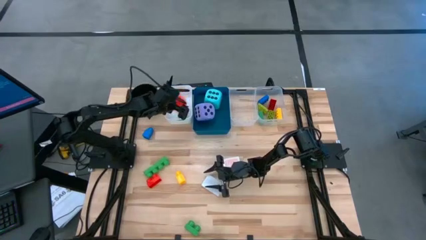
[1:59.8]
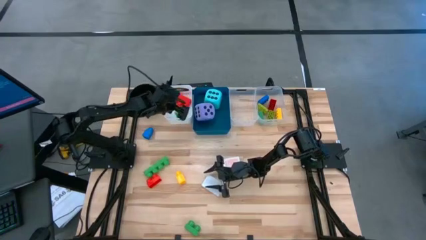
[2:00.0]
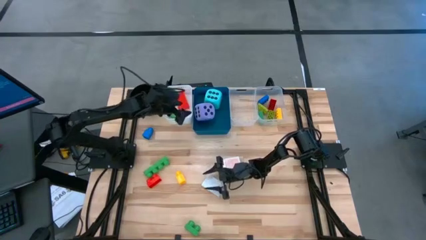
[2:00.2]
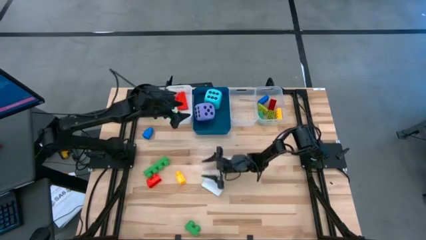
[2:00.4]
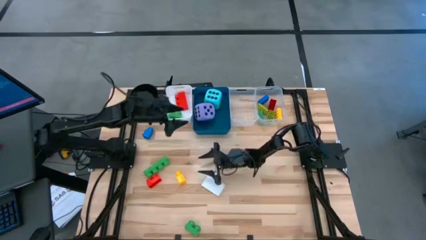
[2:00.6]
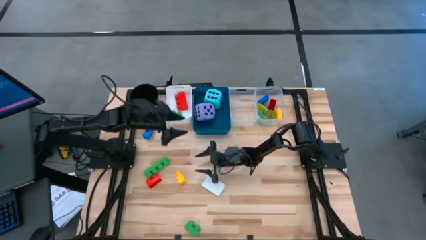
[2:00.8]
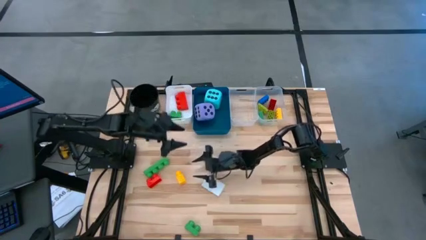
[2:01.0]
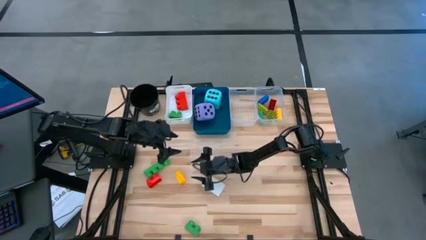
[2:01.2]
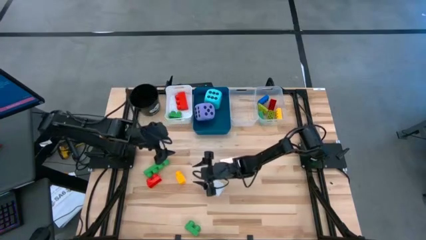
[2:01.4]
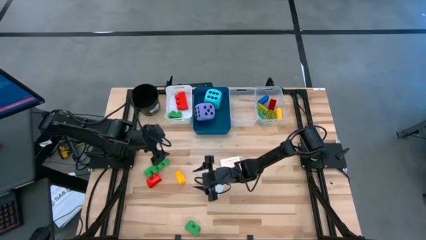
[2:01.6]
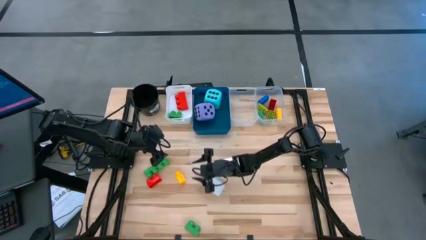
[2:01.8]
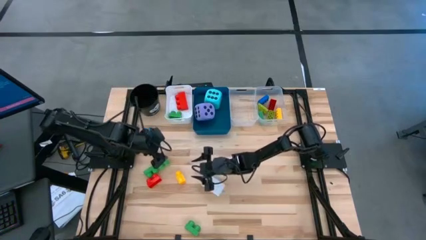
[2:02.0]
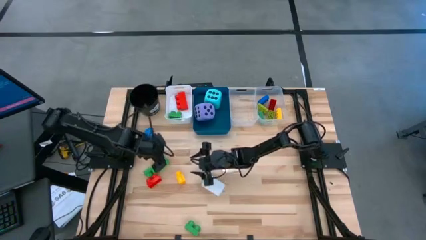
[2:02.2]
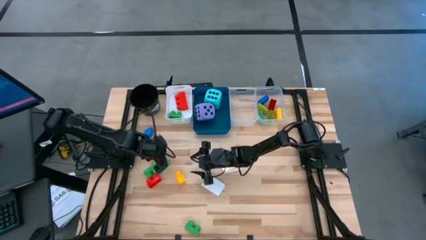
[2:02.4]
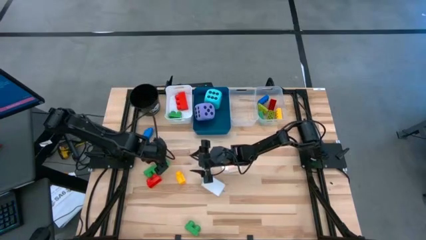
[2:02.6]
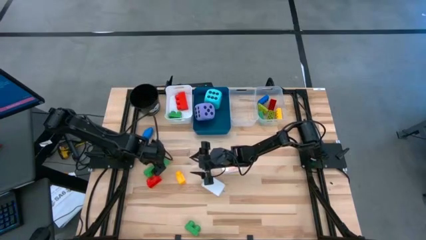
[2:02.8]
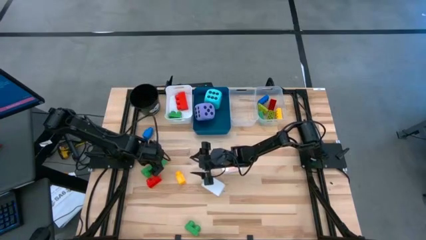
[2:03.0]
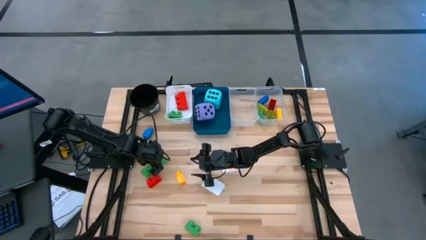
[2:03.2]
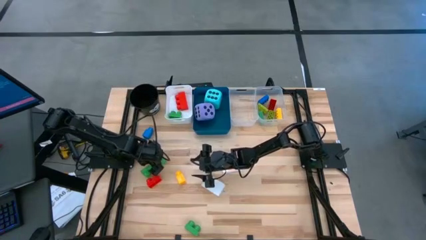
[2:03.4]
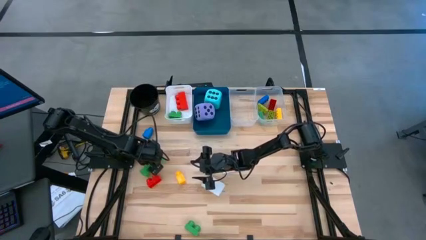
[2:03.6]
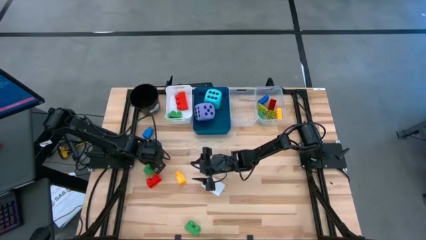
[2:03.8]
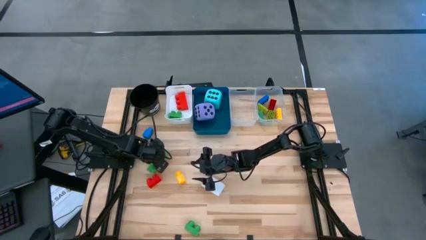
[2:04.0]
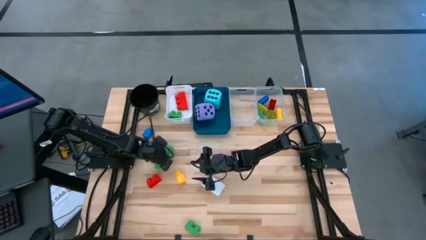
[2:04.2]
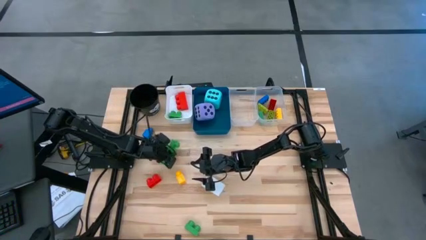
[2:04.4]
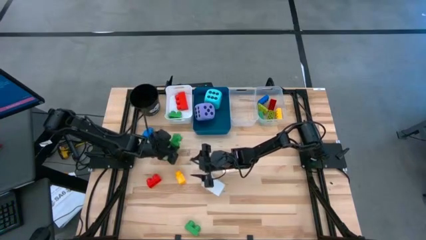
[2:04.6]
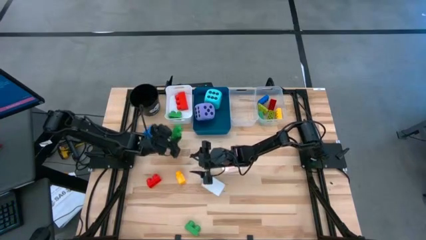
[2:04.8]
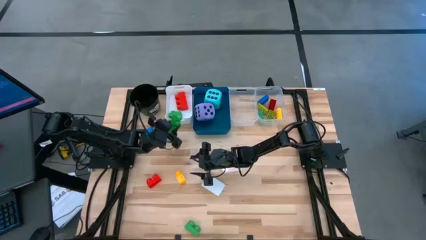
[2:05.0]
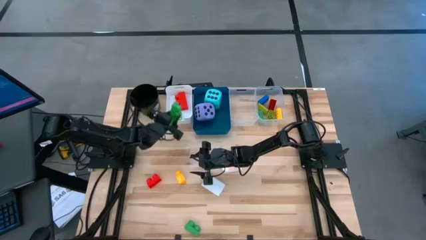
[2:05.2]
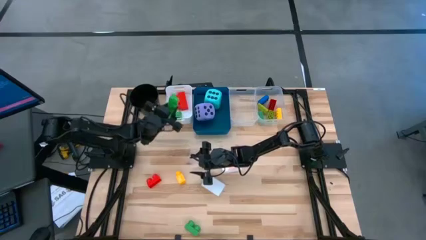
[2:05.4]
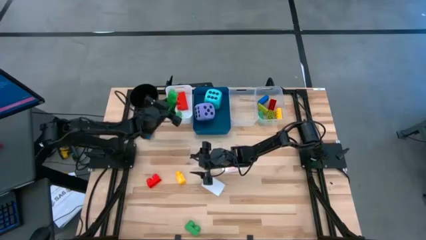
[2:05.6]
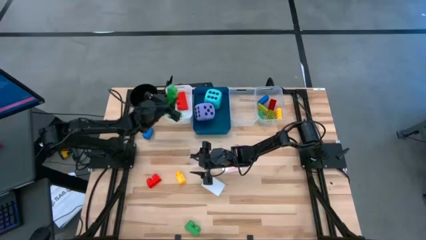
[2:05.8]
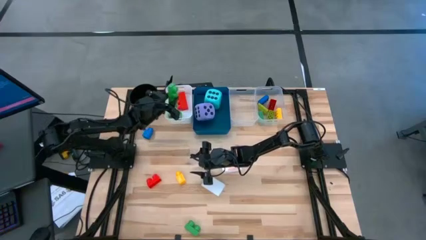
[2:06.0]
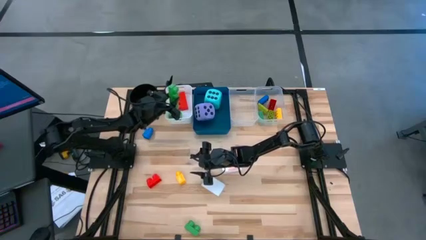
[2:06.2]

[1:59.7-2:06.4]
Task: Pick & Place Toys
Put the top large green game piece into the white bin

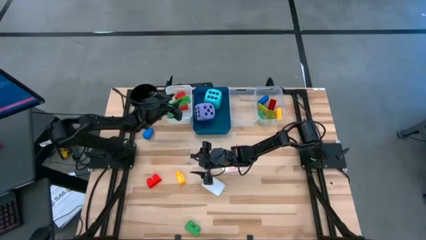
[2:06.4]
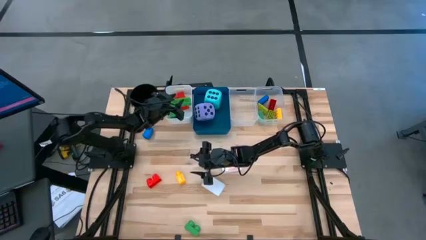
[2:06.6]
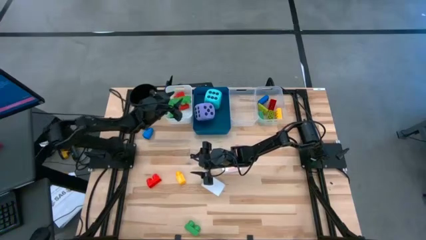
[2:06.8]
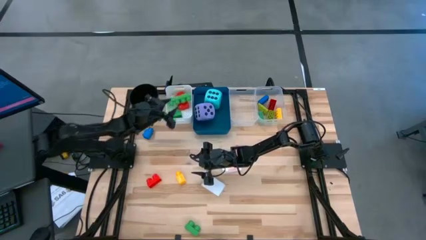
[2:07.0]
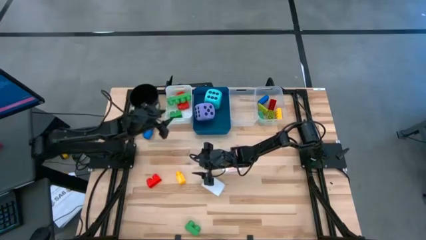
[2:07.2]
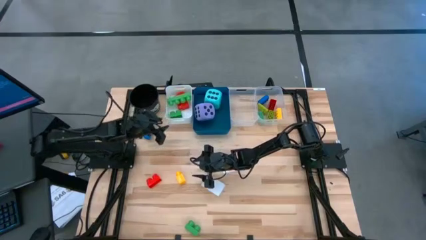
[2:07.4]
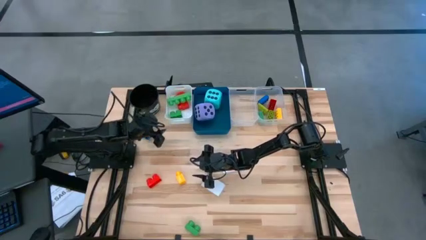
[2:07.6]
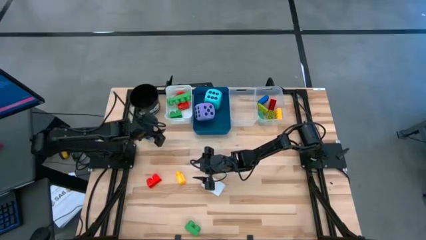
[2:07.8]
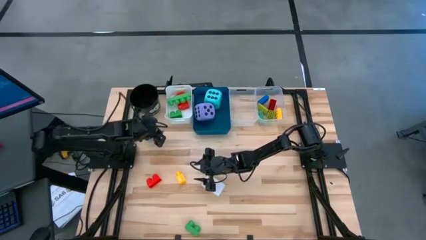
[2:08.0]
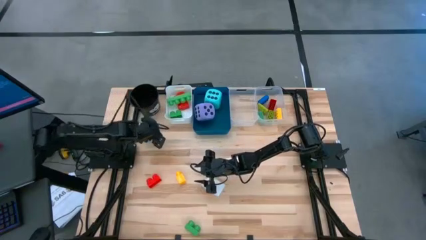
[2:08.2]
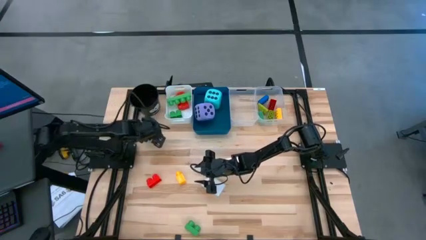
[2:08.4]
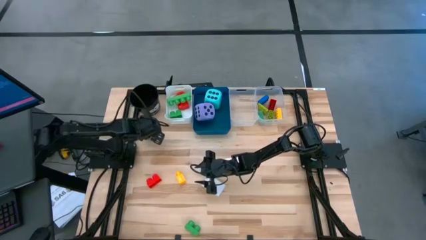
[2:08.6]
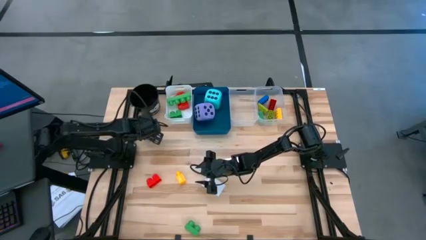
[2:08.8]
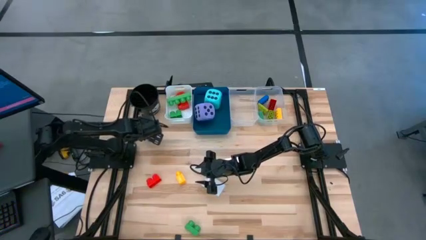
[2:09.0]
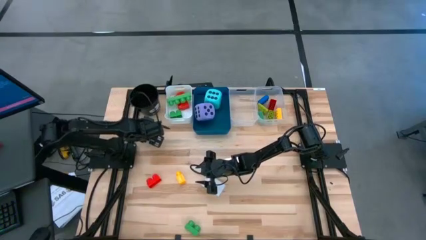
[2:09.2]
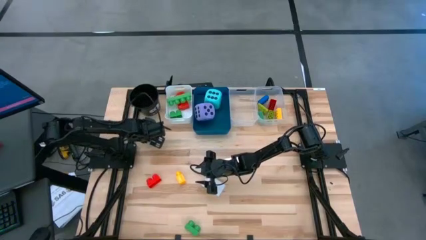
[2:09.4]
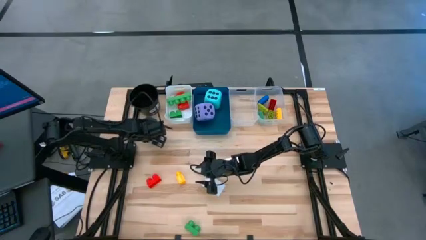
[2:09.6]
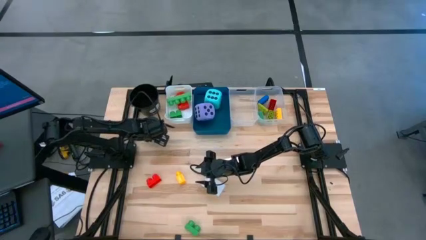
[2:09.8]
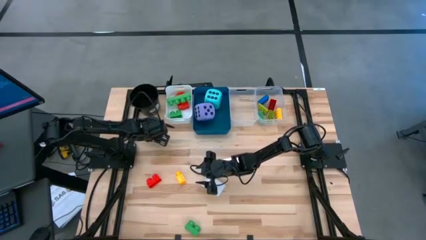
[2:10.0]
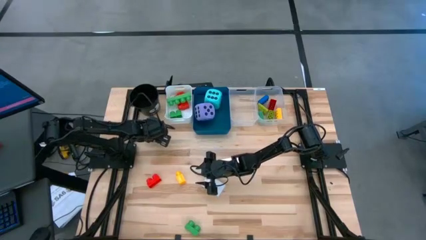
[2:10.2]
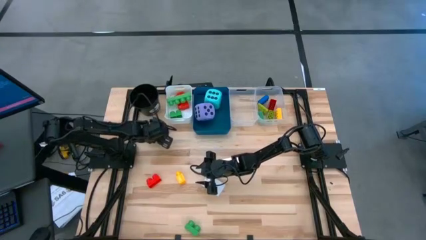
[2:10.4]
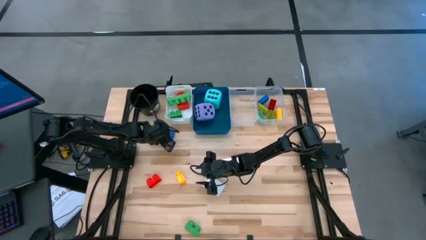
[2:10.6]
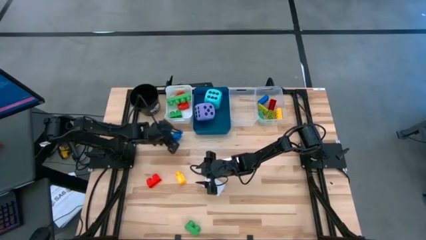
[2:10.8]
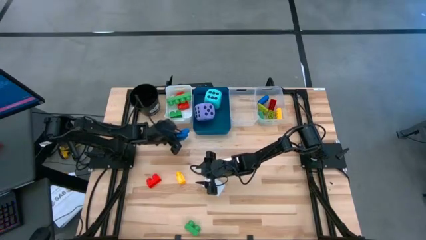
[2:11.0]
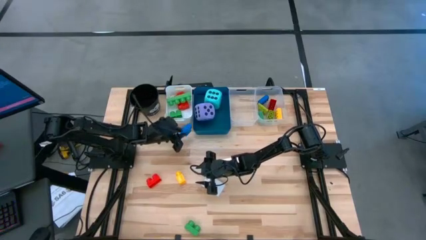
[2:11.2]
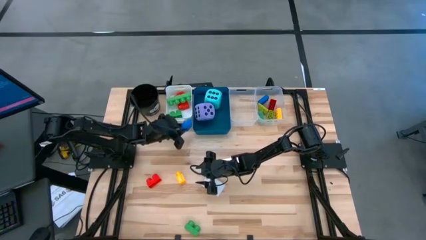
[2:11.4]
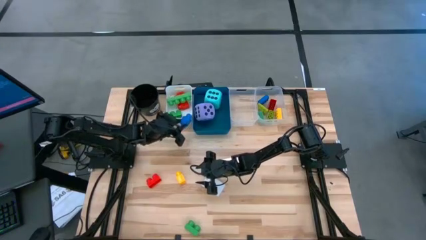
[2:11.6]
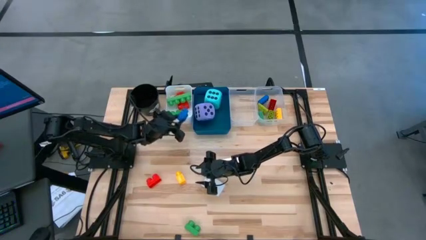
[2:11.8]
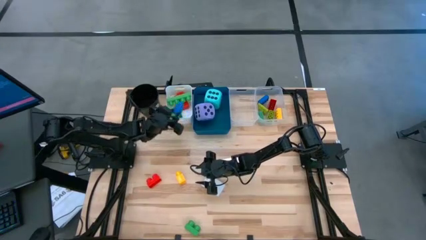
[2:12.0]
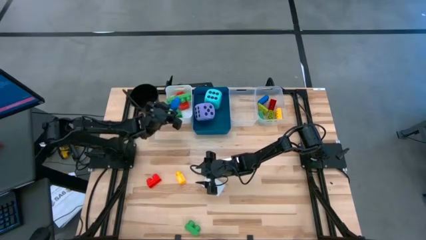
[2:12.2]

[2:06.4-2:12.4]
Put the blue large game piece into the white bin

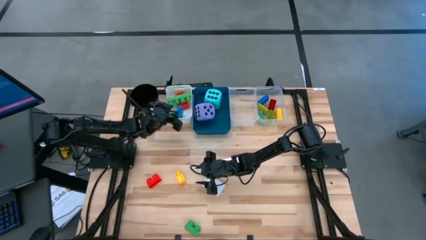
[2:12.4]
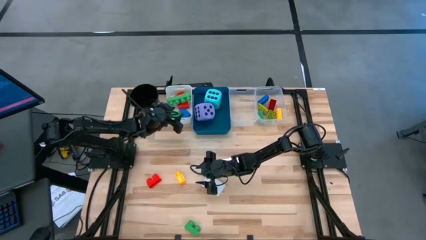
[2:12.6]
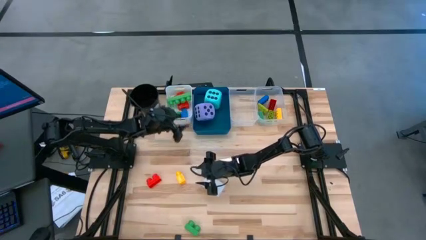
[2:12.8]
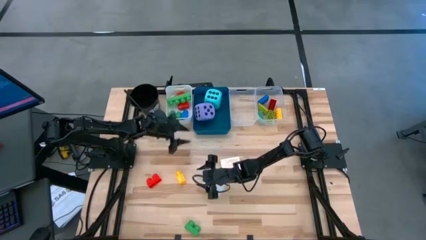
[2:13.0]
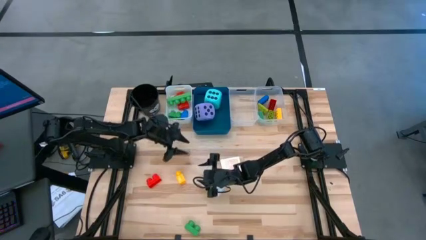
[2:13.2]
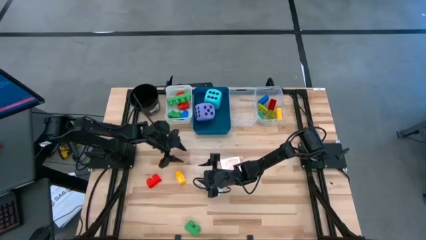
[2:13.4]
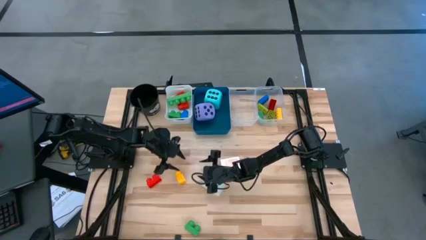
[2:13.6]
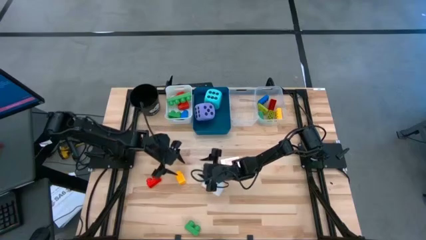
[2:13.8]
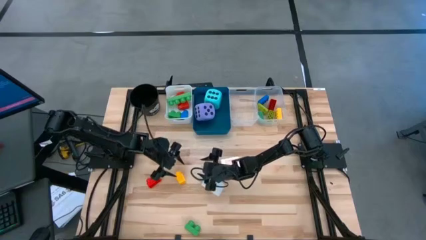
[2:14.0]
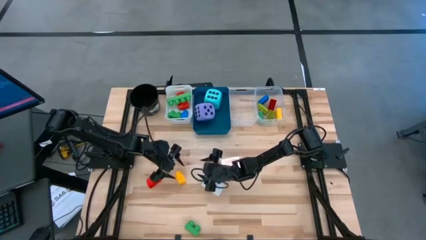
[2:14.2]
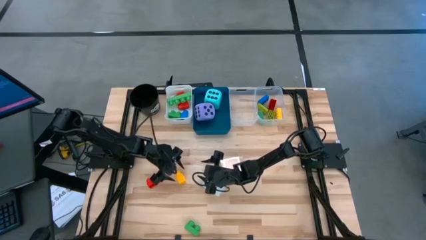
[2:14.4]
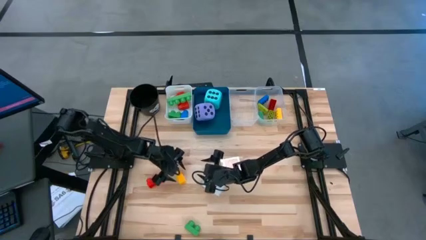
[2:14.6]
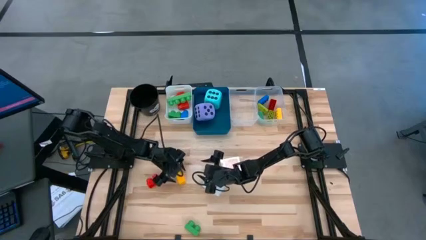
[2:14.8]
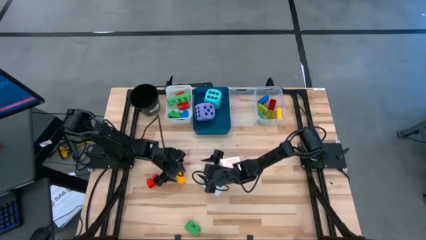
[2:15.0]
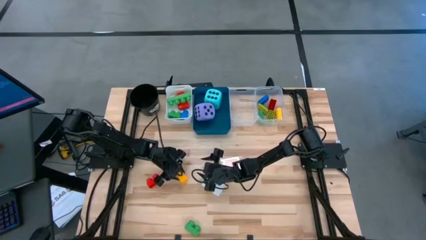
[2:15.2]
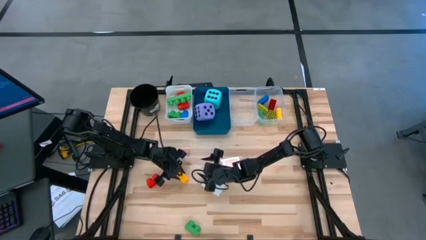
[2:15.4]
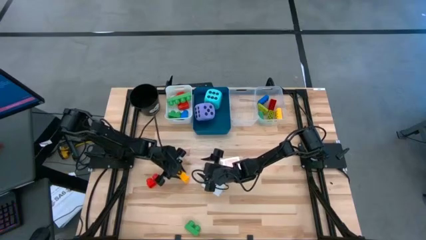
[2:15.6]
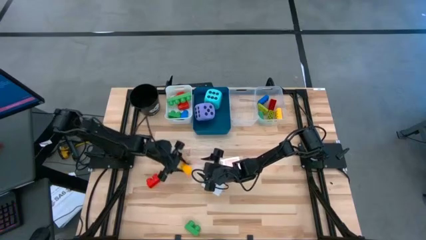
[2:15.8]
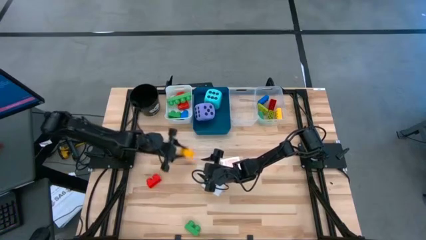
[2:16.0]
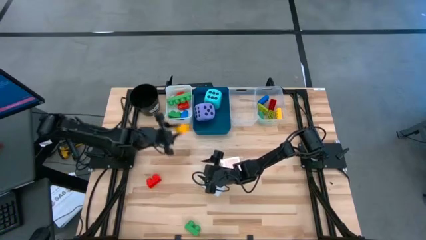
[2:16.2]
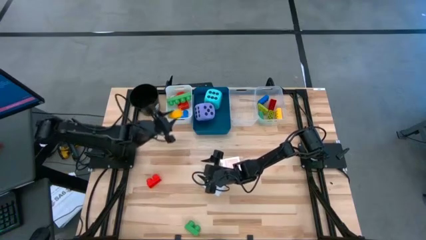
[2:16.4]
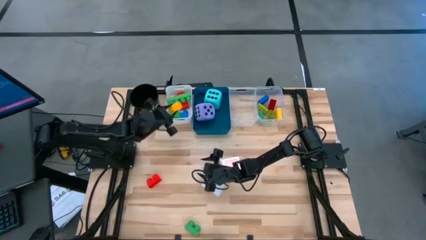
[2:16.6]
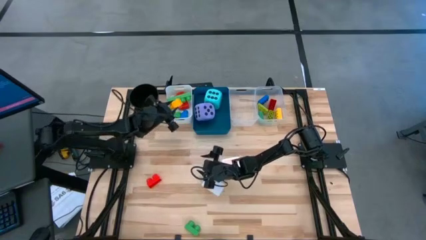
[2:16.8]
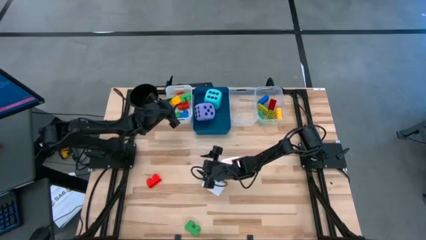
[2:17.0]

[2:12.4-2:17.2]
Put the large yellow game piece into the white bin
